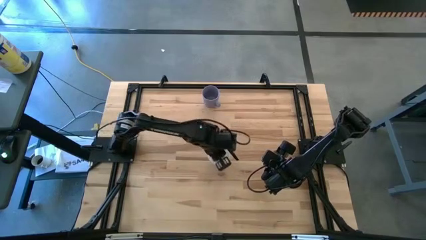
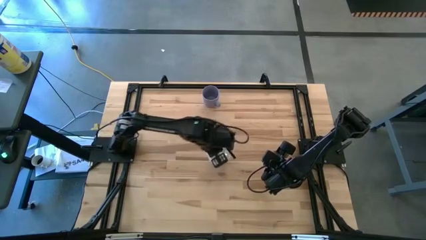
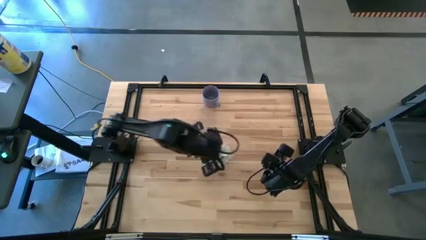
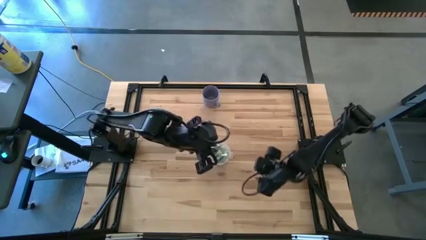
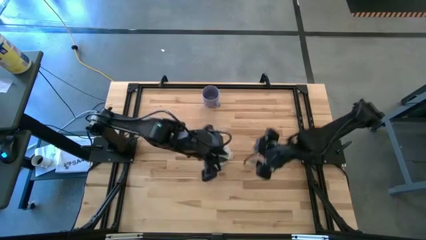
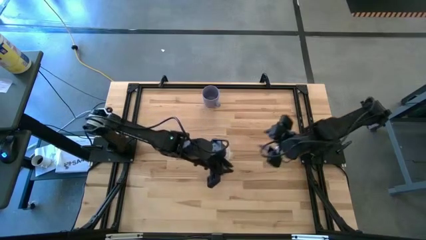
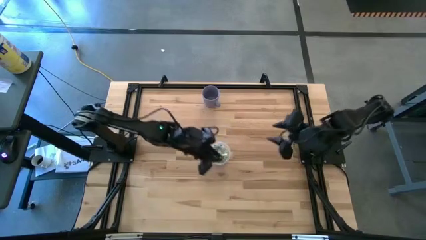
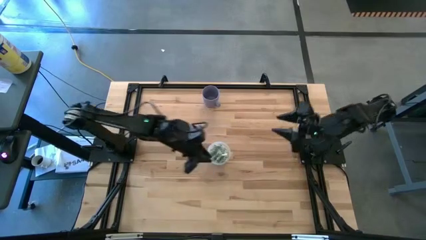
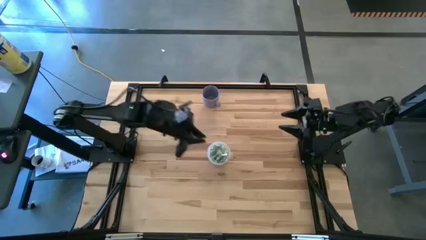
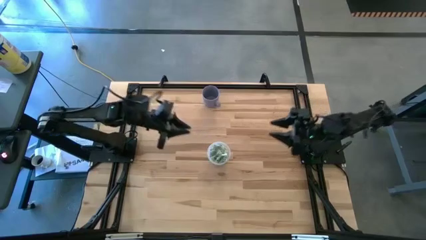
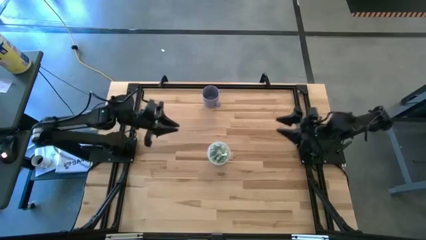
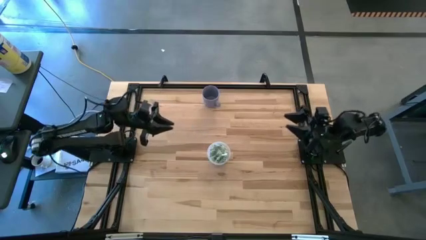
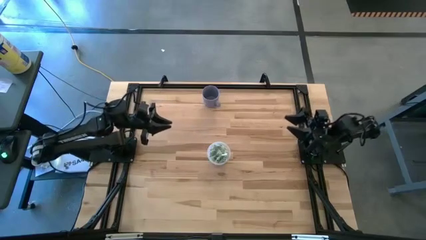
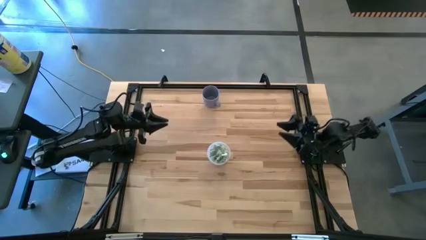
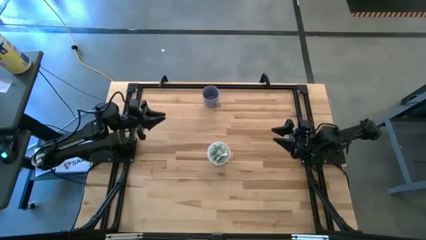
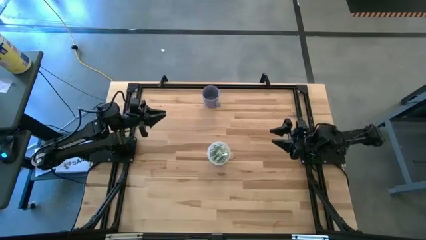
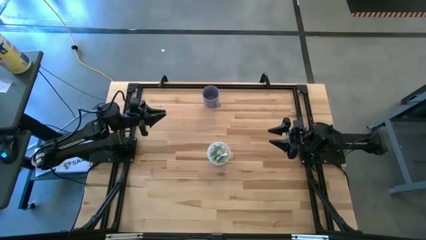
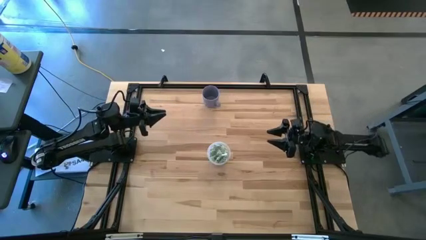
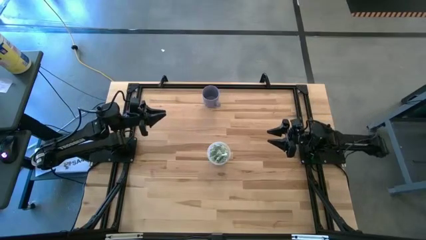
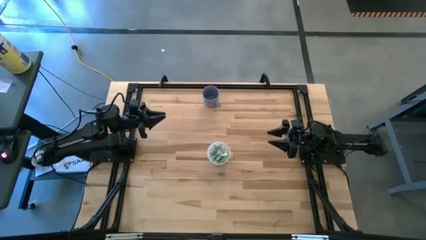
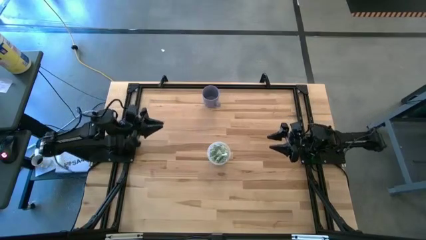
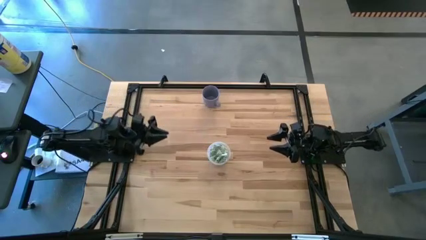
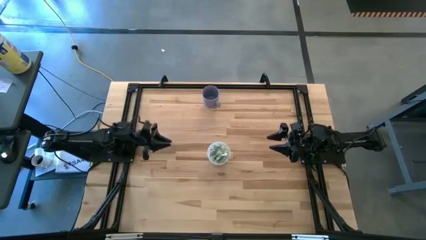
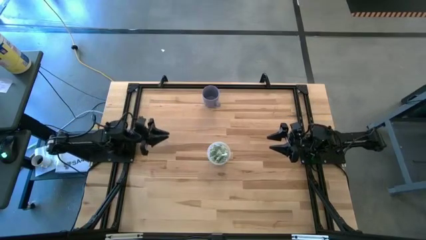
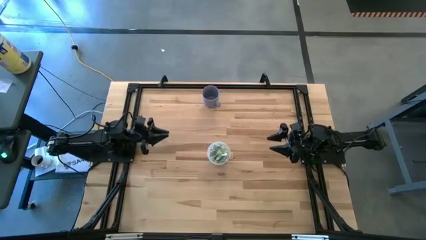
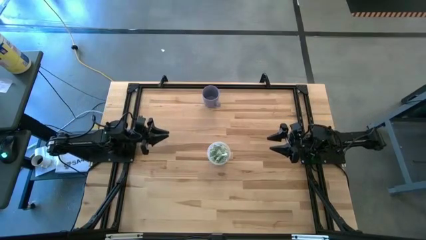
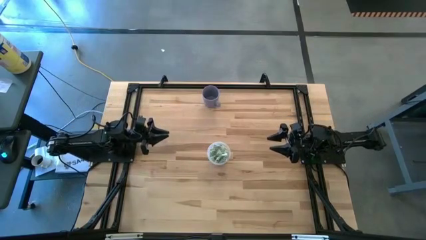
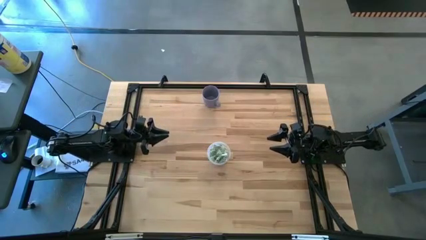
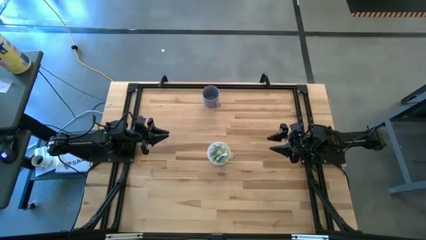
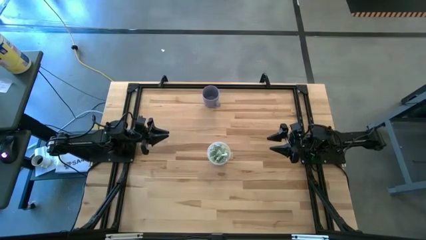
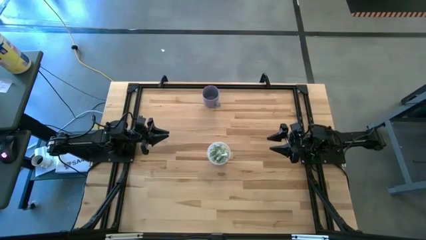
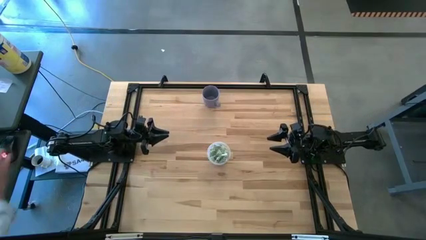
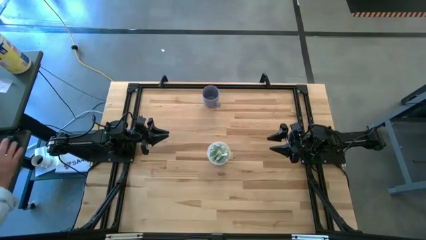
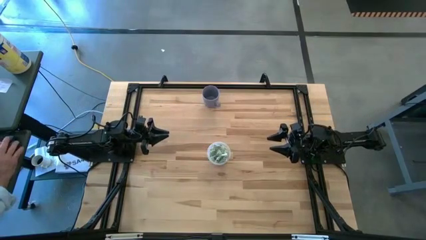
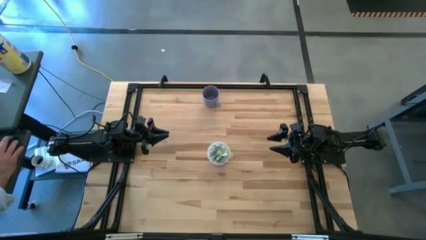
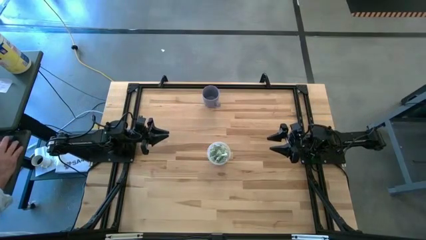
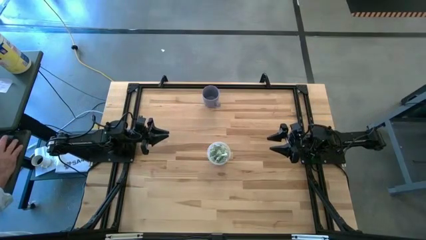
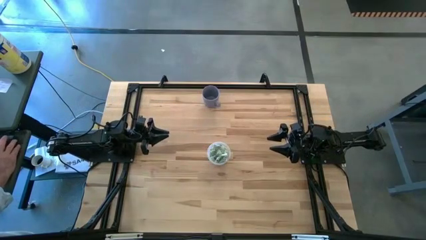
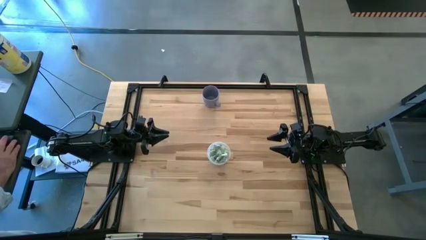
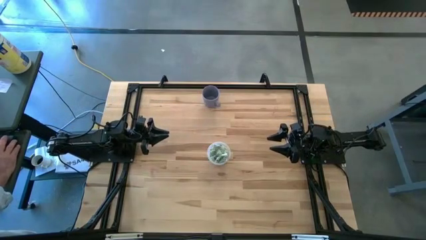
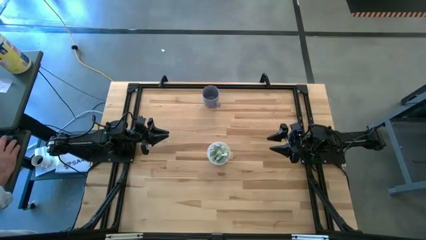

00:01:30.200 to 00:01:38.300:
Task: Pick and place Stevia / Truvia into bins
Return to Home Position

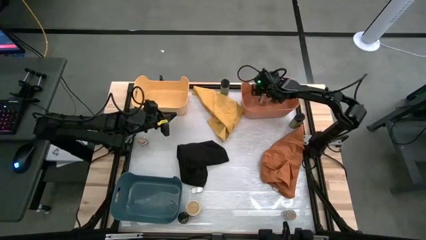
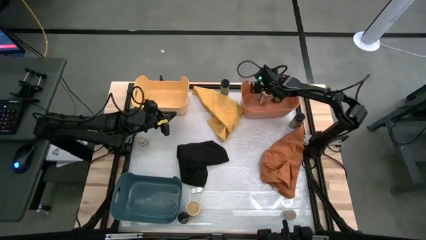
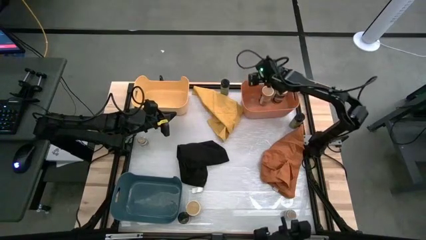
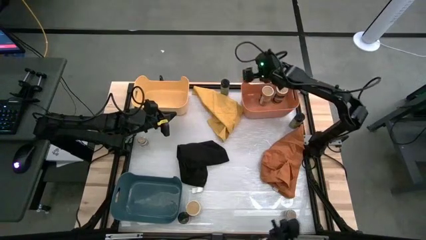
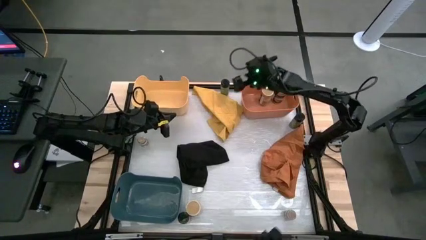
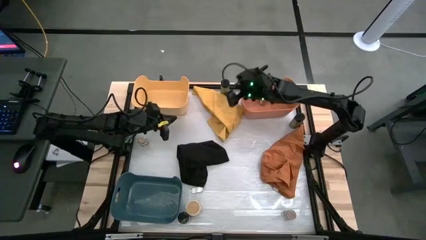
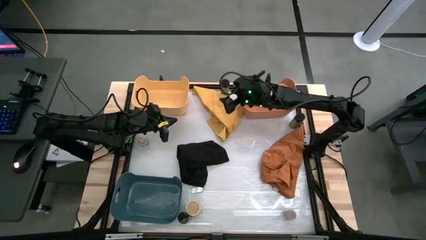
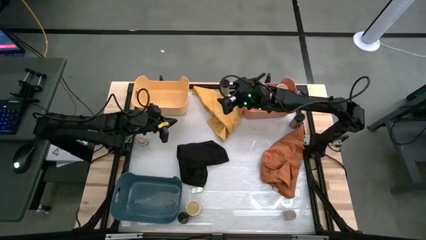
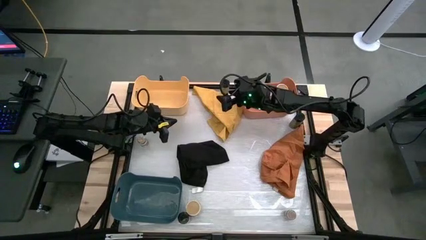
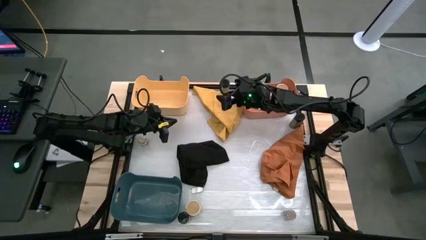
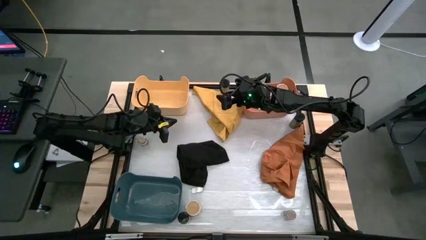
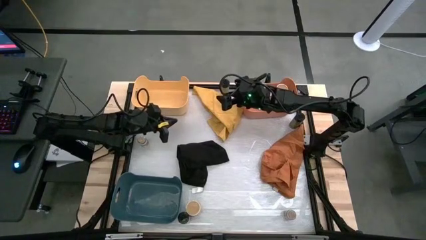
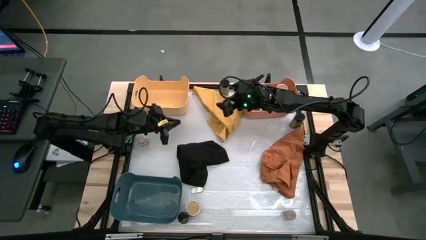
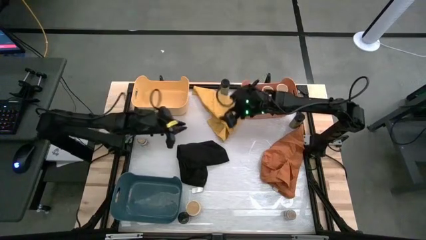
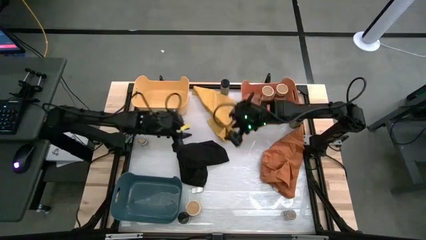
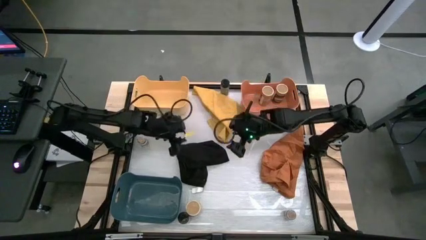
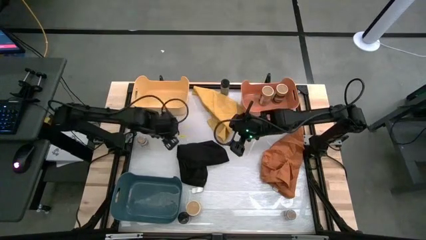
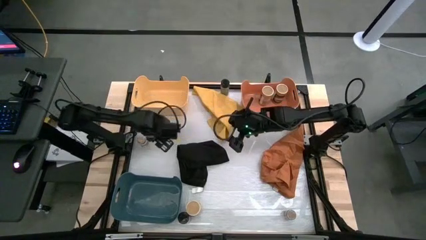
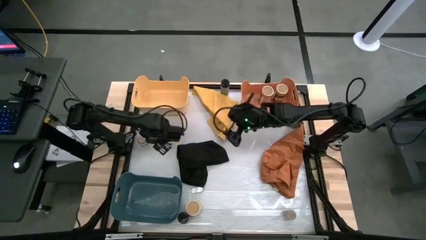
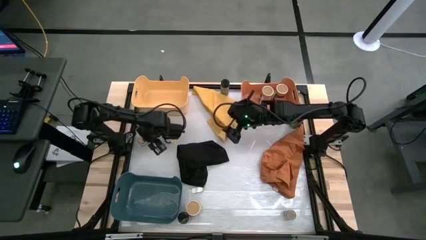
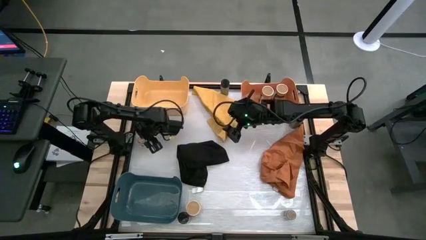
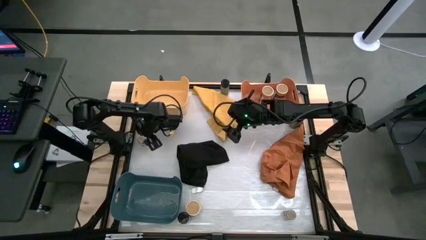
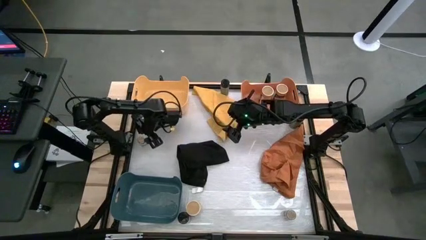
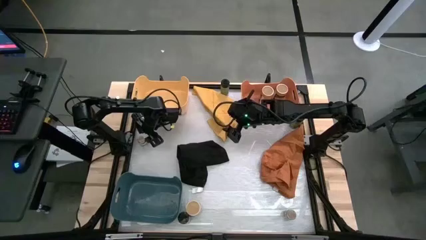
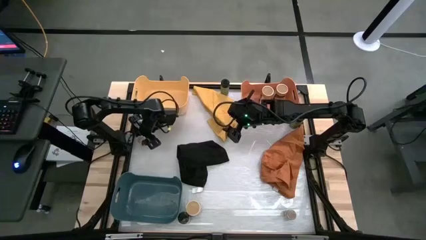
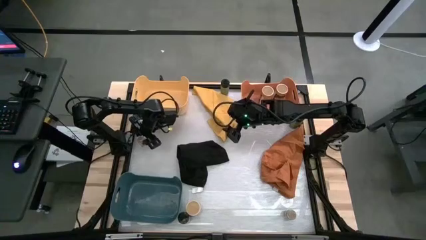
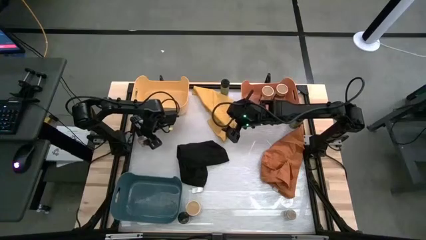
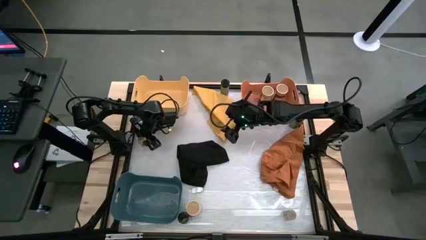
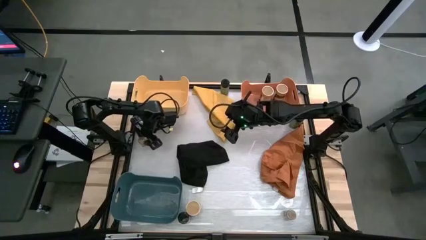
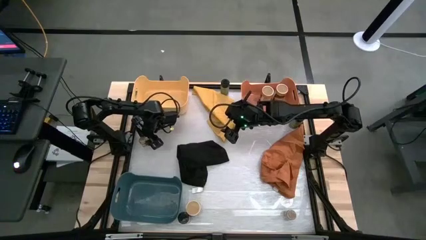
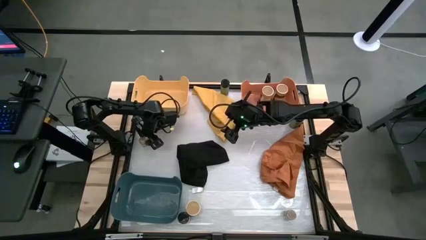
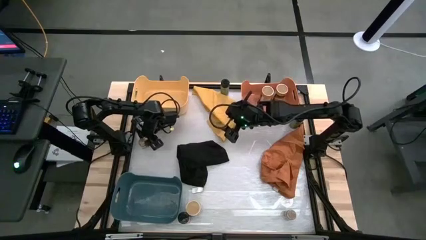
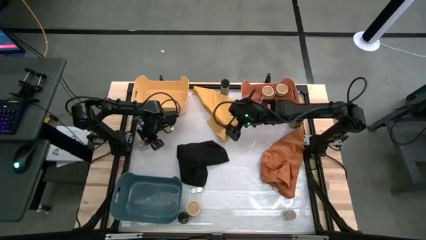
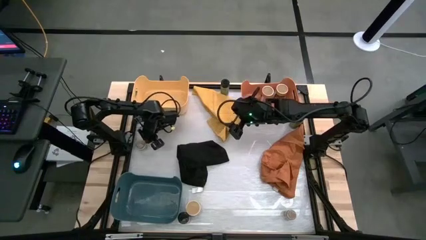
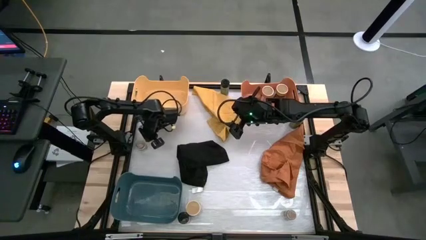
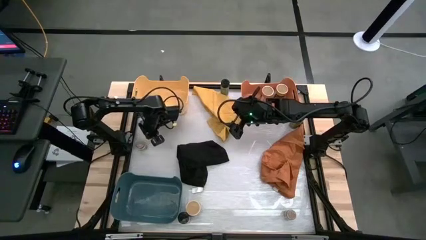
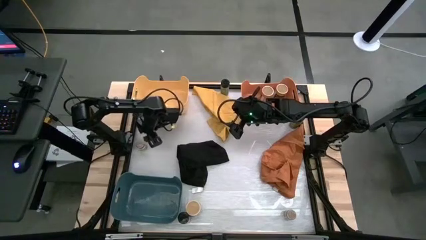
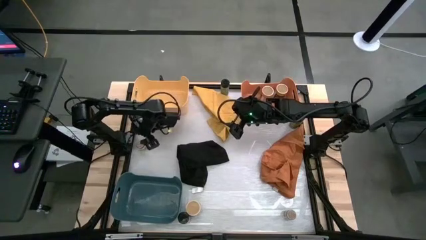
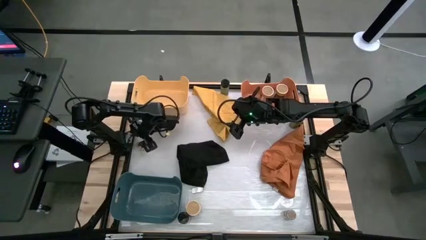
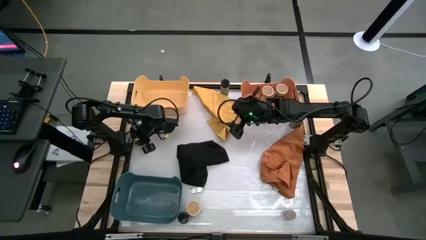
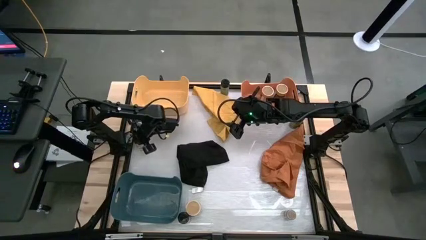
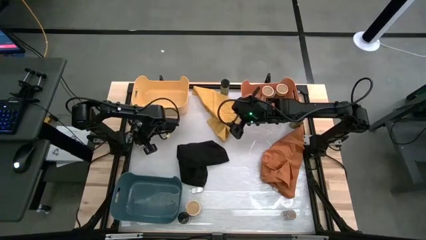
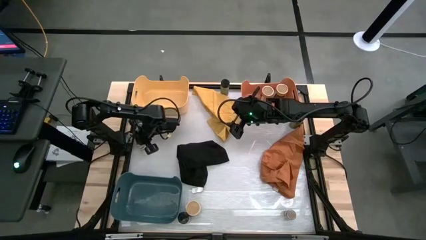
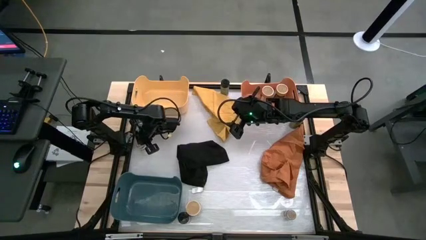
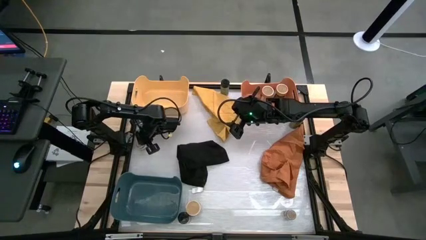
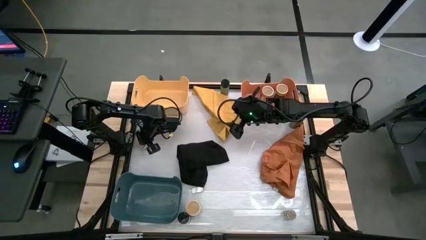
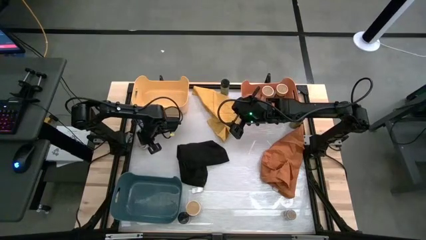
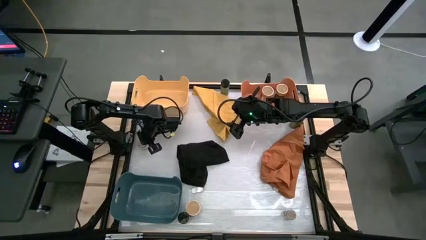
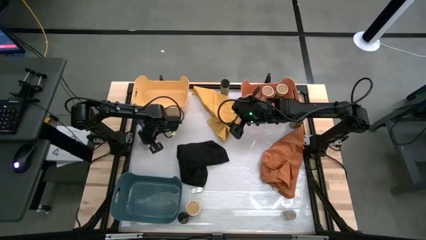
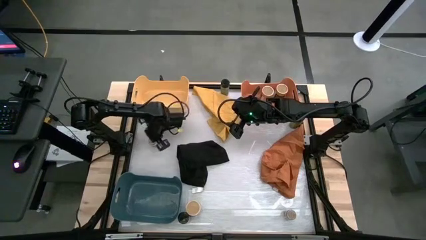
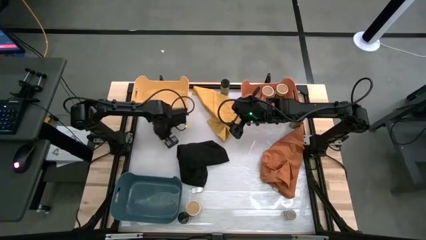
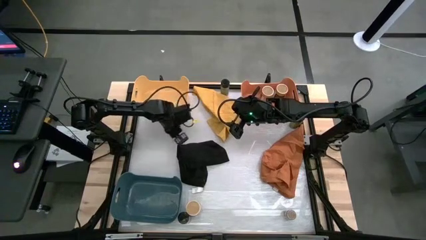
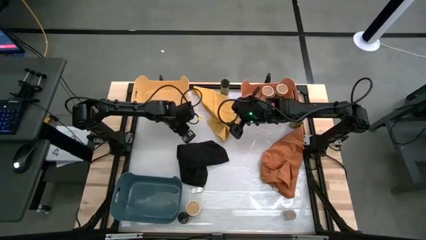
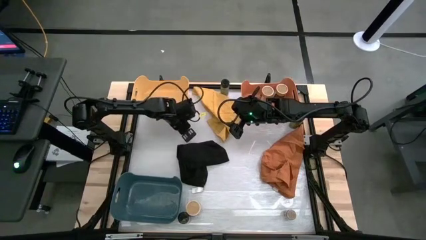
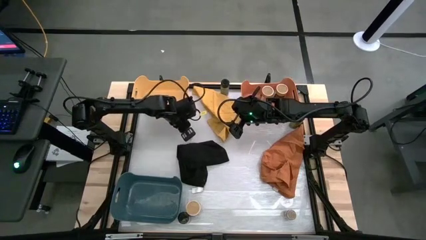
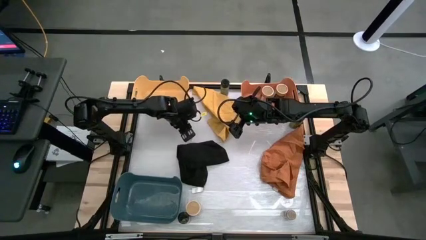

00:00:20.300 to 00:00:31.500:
Task: Sort spices by type
Put the top brown seasoning bottle into the yellow bin
